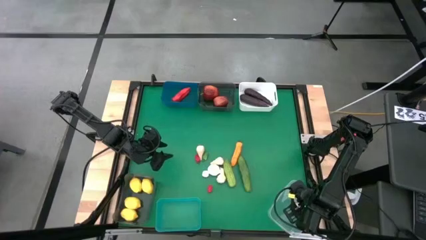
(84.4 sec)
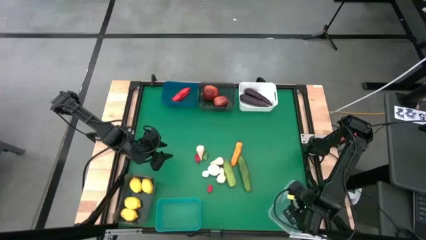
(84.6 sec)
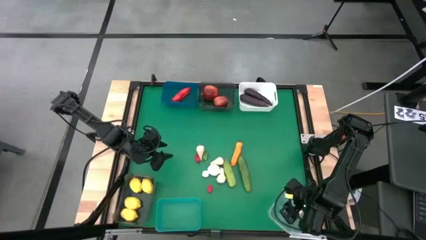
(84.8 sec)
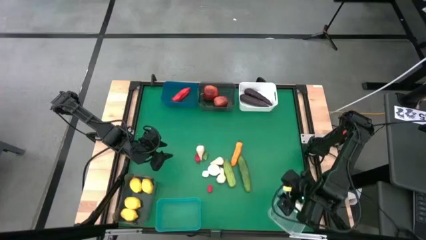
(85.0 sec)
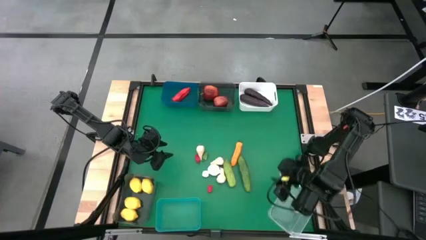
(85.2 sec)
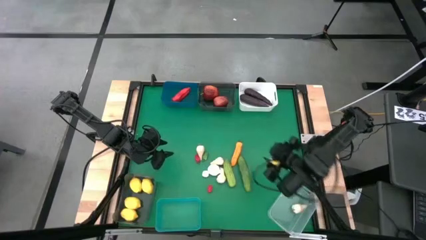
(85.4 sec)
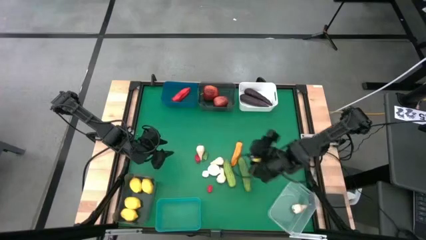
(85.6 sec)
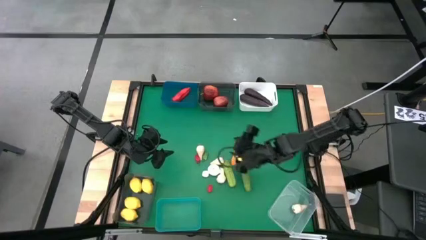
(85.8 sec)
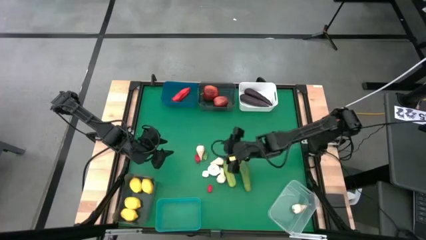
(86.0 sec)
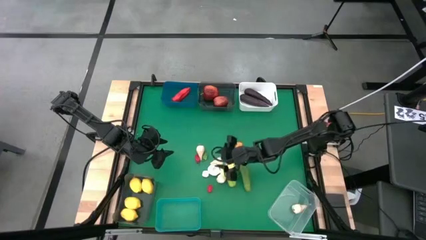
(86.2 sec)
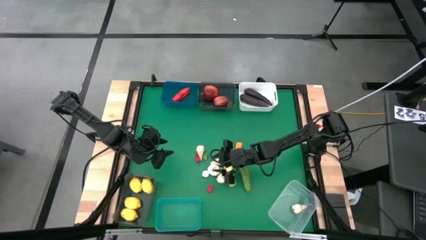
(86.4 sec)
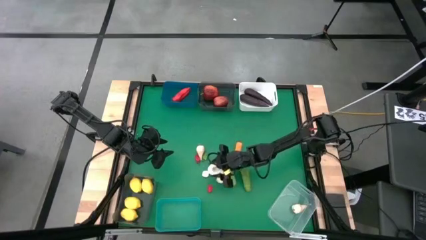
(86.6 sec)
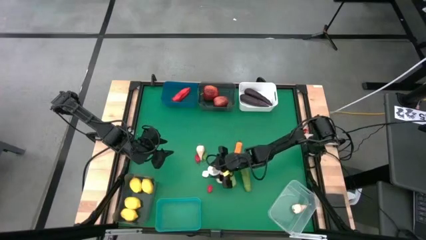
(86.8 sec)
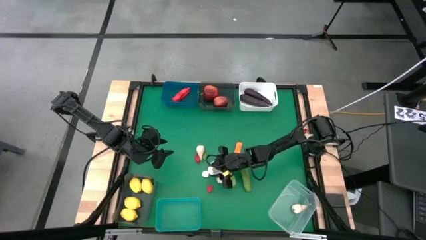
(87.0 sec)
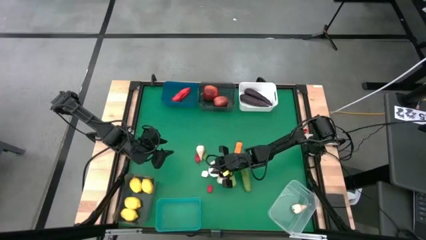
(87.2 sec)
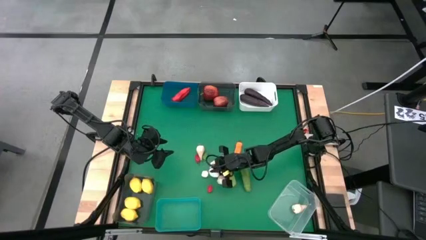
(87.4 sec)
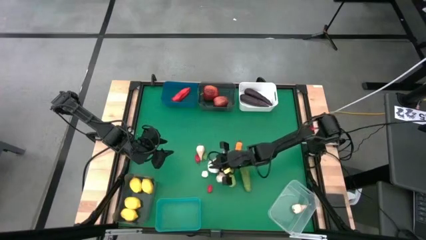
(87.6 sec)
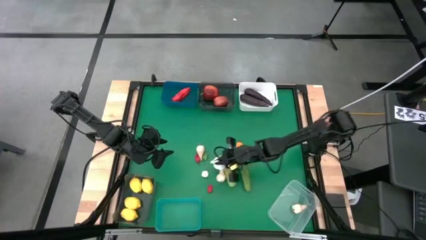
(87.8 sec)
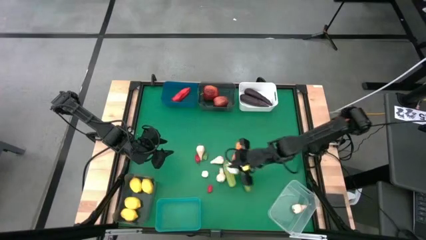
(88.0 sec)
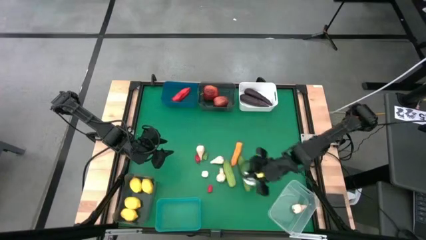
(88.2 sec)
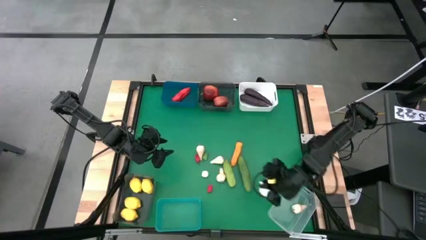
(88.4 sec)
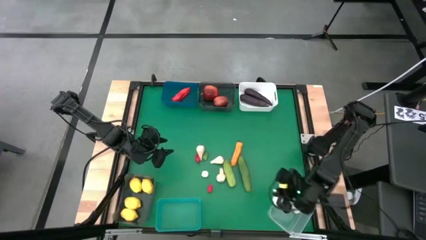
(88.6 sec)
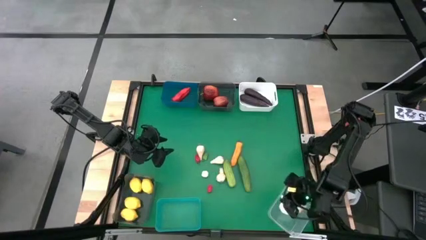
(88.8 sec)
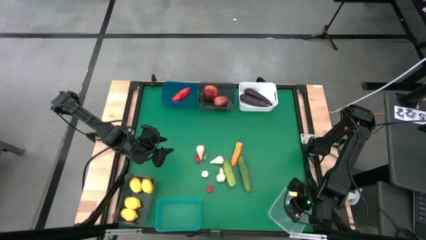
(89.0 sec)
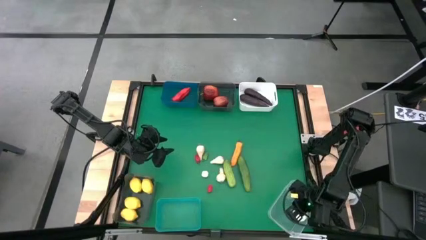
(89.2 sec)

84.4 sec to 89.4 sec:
Task: Sort produce into baskets
Put the white garlic into the transparent bin

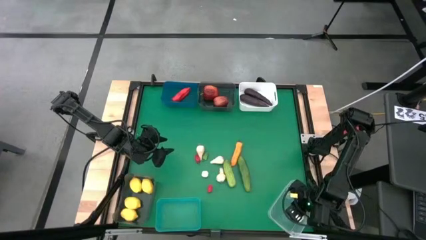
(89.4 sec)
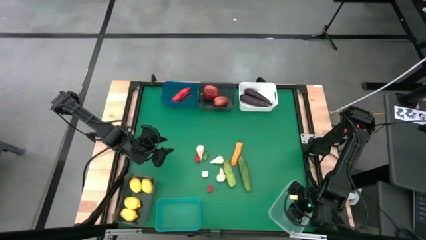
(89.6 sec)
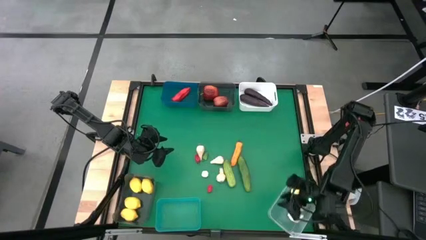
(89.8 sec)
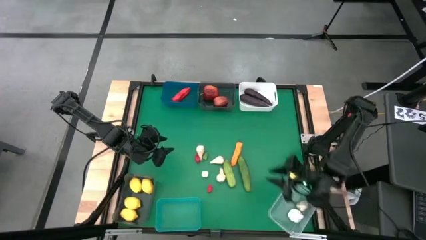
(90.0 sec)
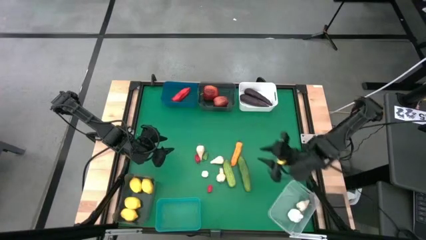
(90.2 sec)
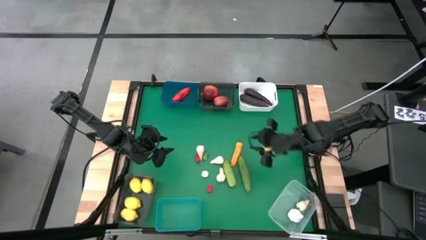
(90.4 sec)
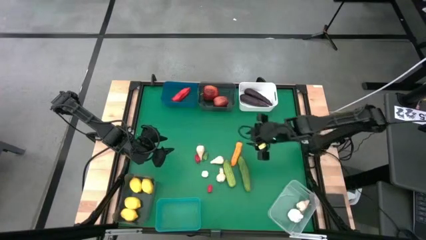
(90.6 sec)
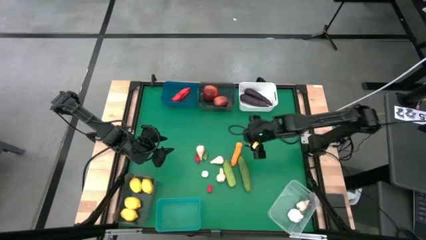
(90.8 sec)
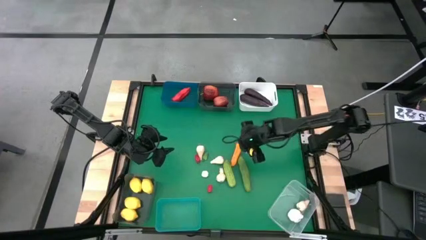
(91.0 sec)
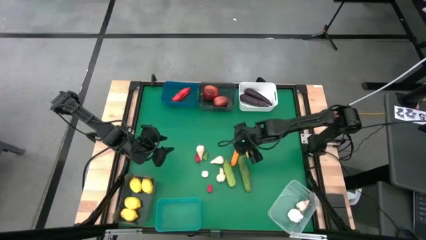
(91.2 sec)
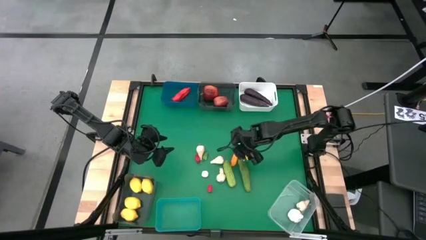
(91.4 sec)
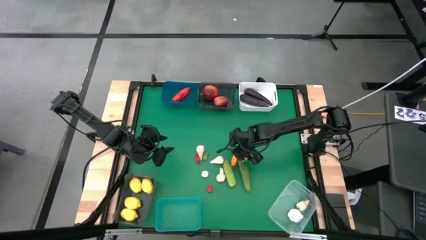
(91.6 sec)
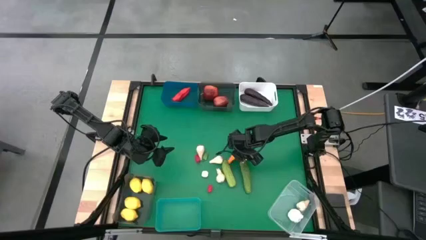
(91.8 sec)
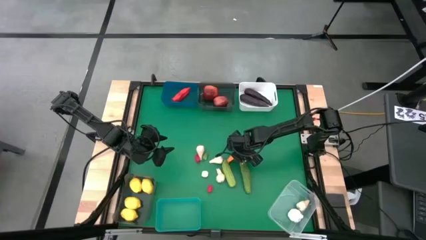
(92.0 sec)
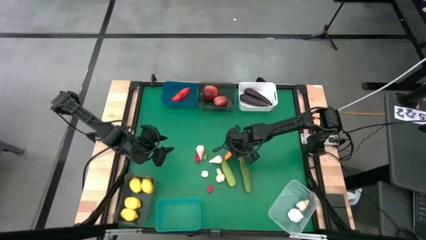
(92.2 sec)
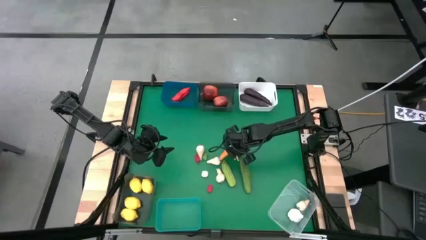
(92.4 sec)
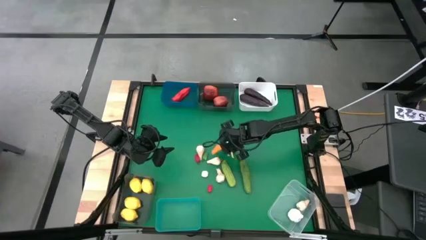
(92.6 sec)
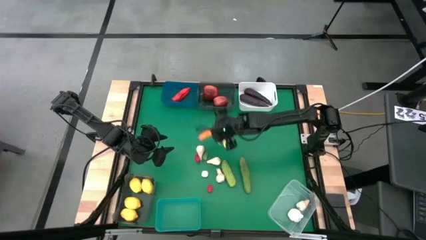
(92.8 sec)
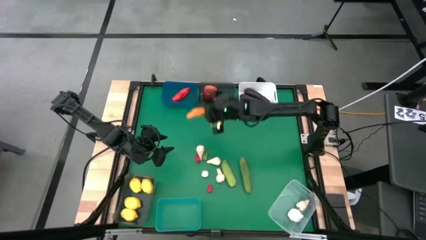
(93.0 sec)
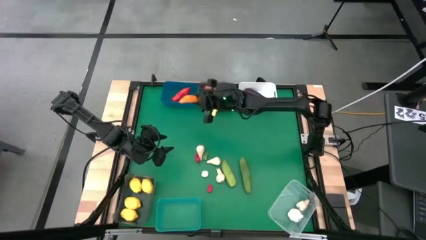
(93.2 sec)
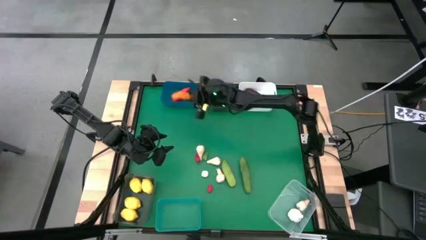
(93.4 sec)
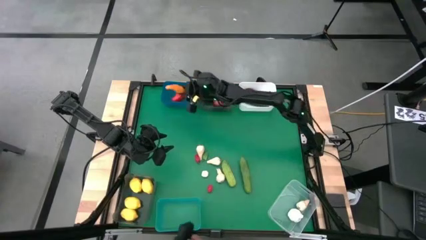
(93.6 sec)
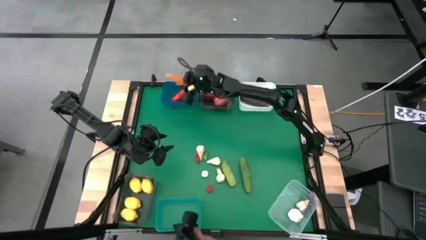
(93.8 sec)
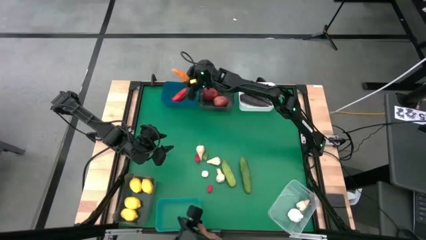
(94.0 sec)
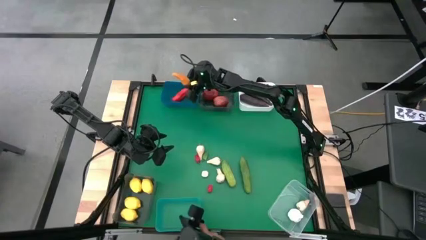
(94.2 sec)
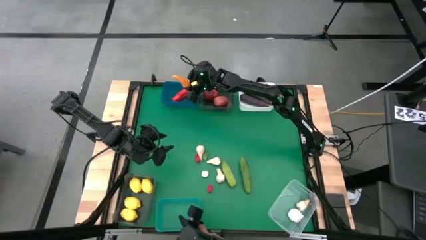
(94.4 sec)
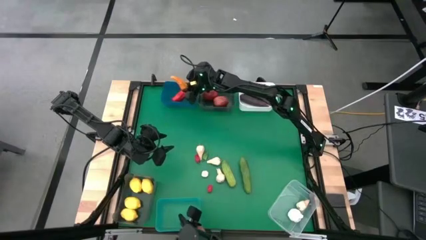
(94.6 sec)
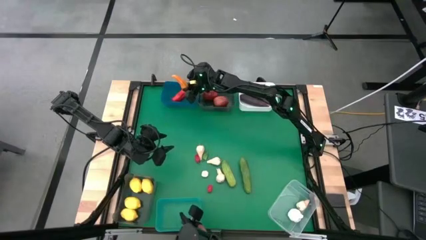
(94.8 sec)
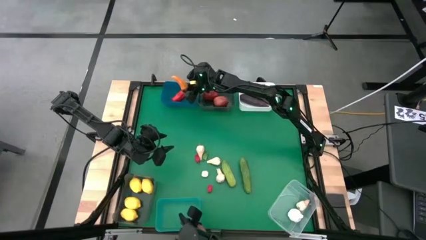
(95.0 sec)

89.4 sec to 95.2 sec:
Put the yellow chili pepper into the blue bin

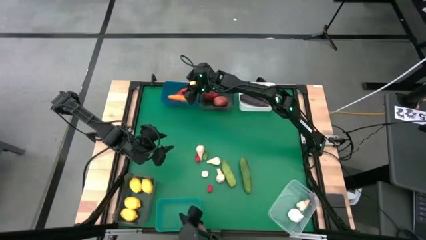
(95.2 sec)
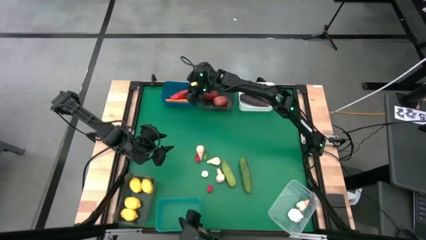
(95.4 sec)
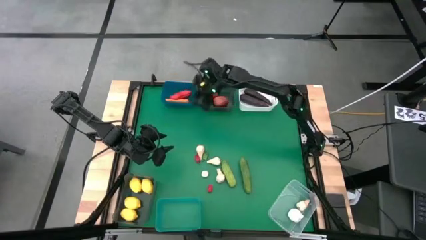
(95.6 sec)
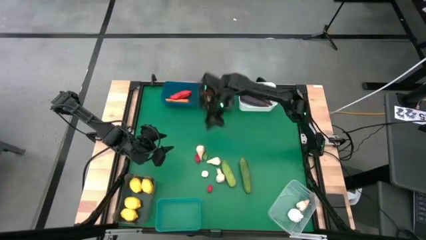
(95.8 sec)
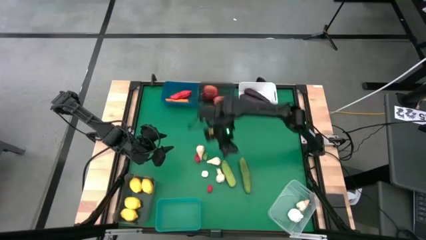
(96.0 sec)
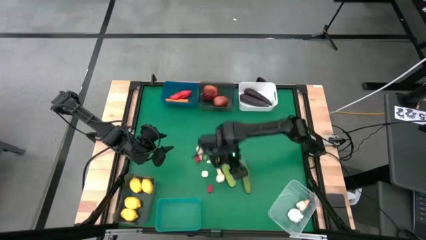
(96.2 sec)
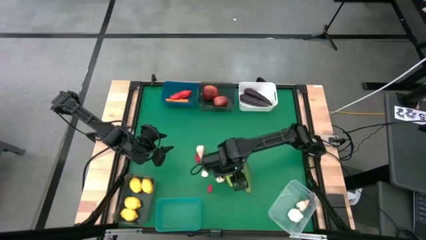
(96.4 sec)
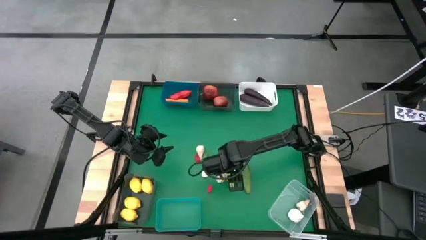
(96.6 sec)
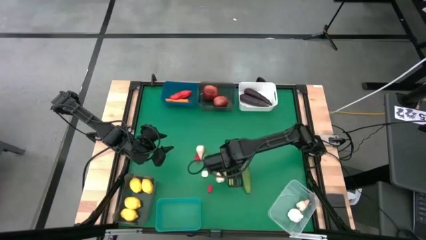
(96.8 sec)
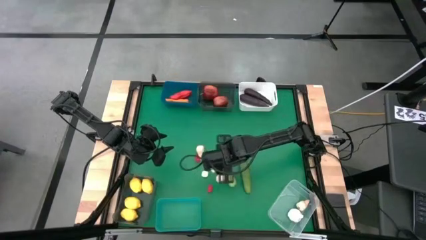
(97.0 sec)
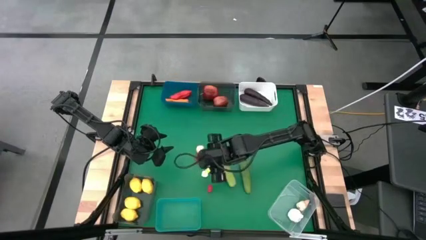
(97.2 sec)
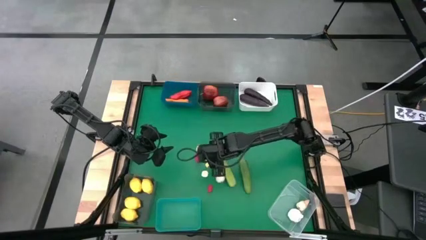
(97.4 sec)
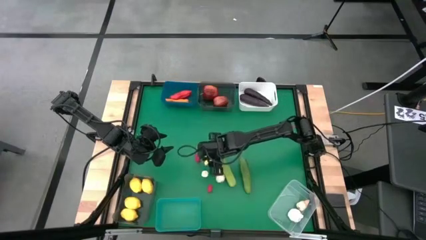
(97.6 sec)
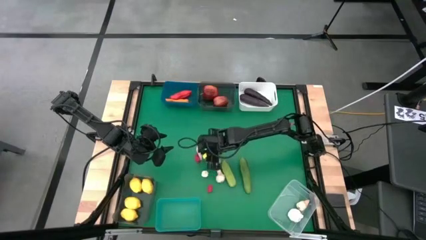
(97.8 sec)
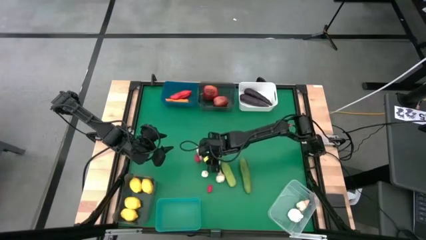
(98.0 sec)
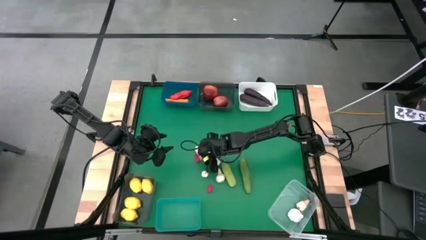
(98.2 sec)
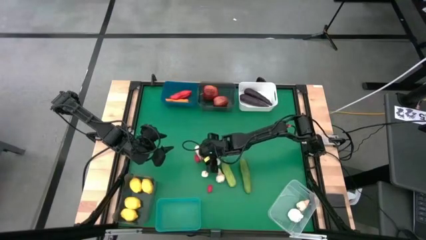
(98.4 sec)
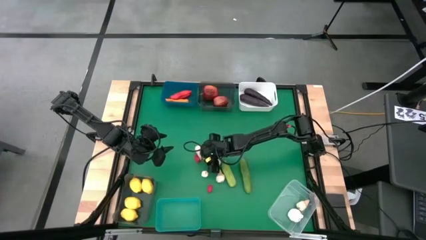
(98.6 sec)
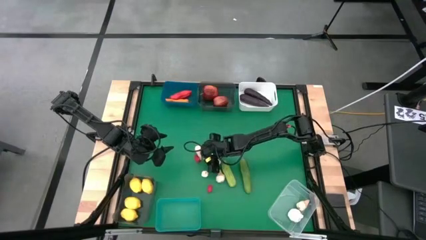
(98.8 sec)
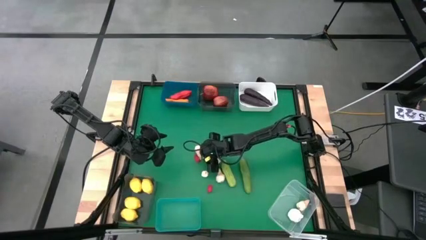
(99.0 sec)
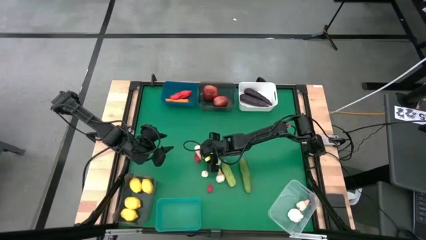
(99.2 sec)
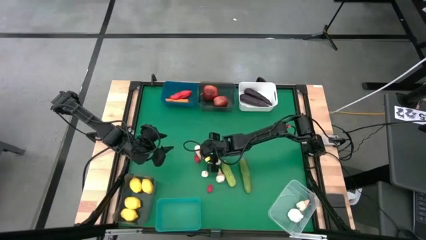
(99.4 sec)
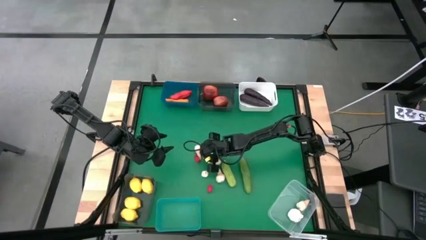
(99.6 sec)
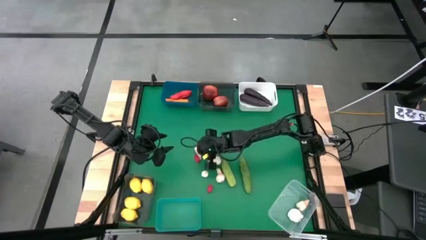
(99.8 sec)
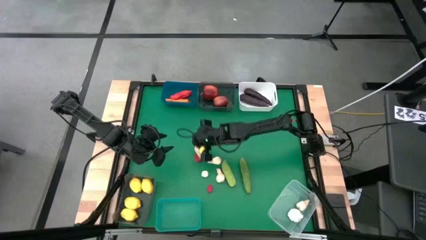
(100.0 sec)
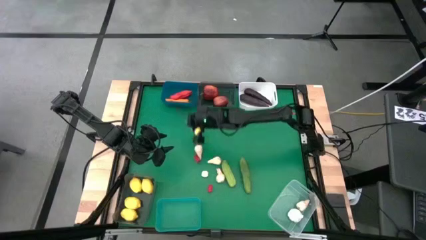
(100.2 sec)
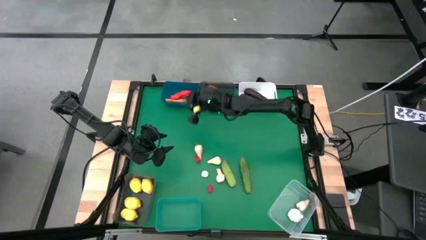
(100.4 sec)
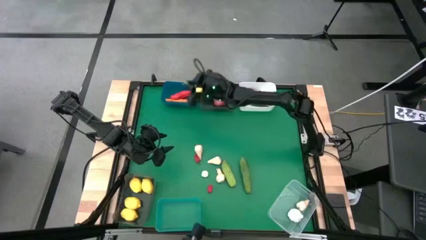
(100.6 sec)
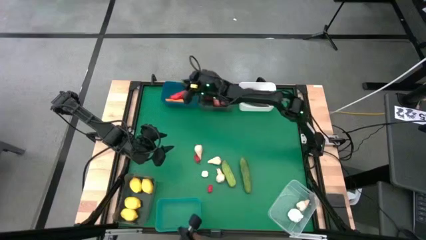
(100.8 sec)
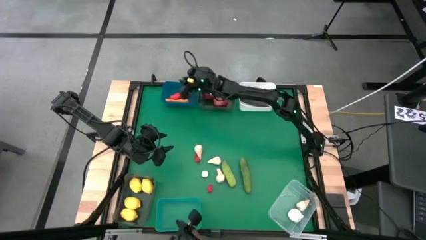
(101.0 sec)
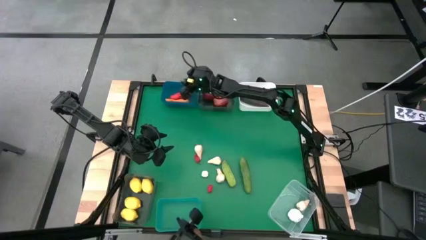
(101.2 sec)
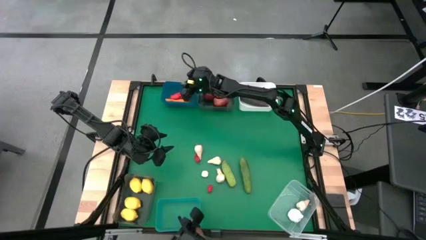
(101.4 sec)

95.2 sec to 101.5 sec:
Put the green bell pepper into the blue bin
